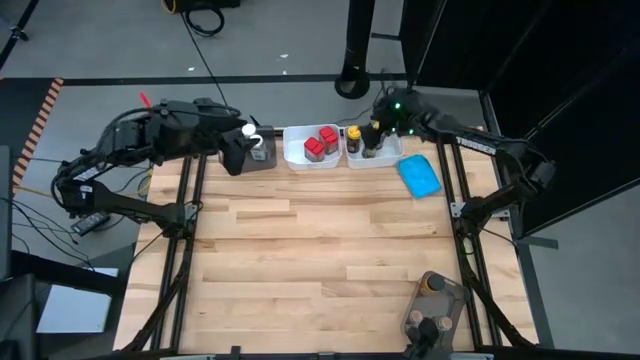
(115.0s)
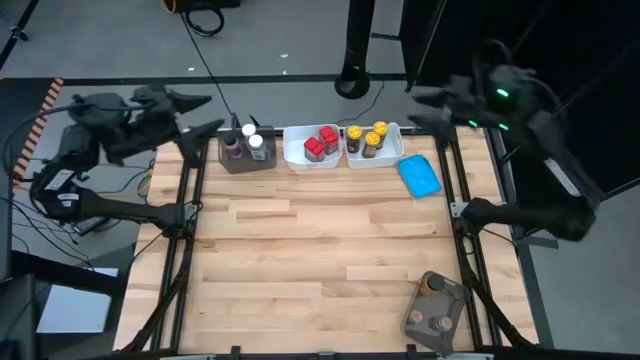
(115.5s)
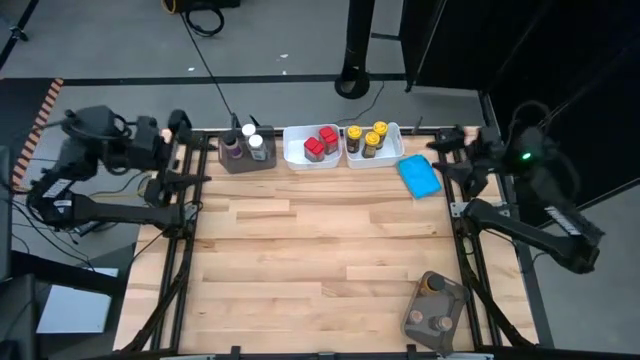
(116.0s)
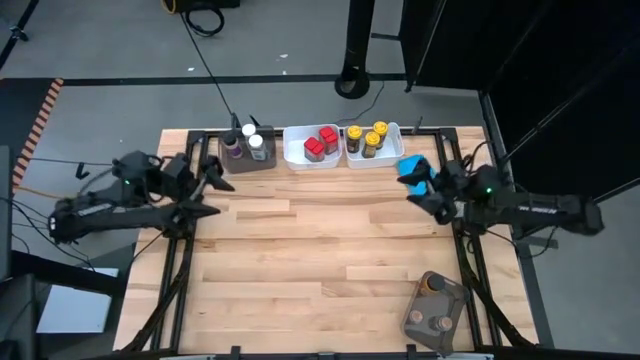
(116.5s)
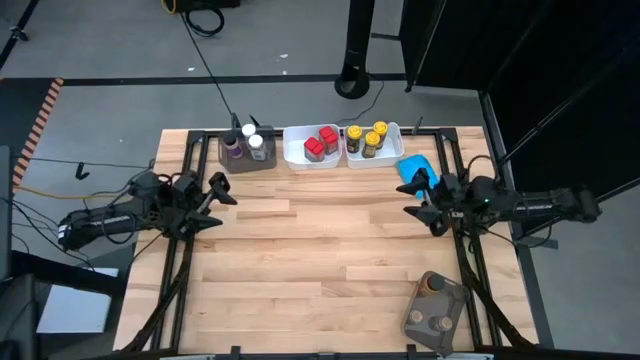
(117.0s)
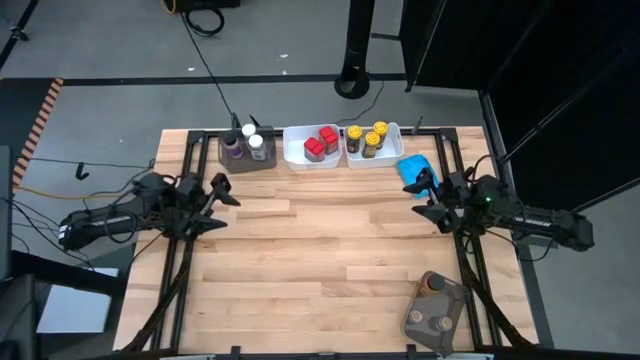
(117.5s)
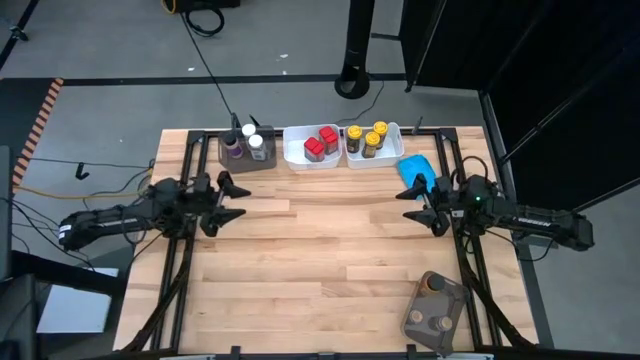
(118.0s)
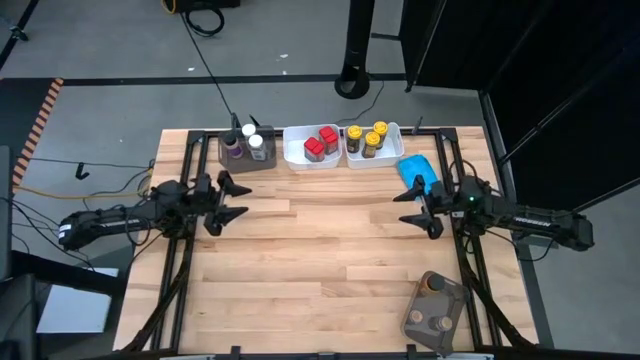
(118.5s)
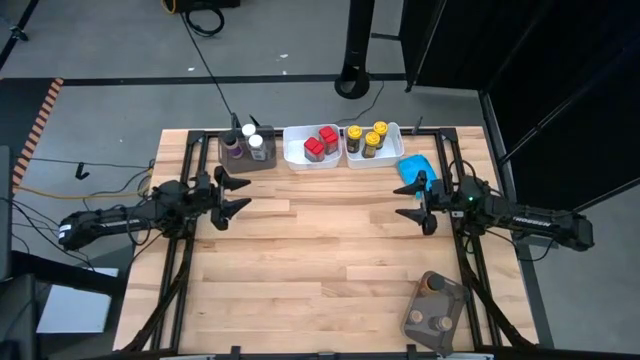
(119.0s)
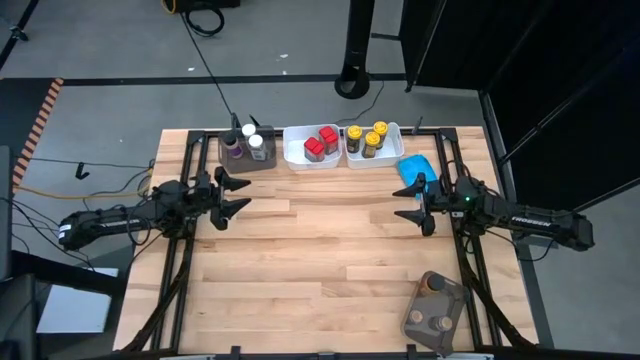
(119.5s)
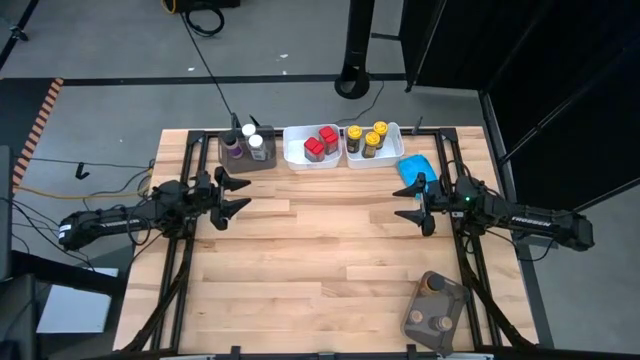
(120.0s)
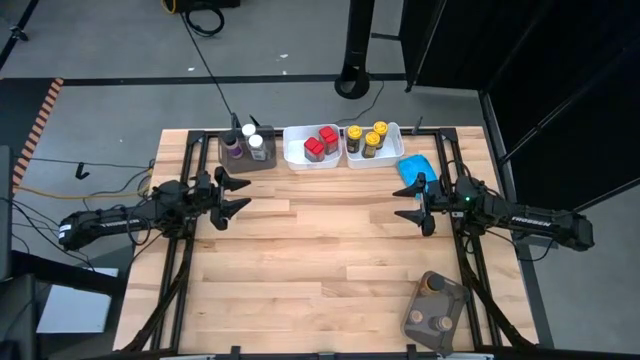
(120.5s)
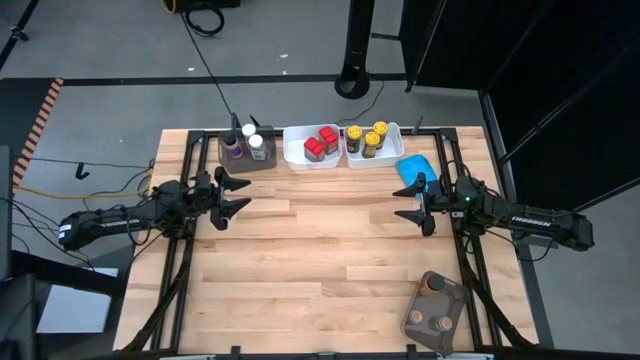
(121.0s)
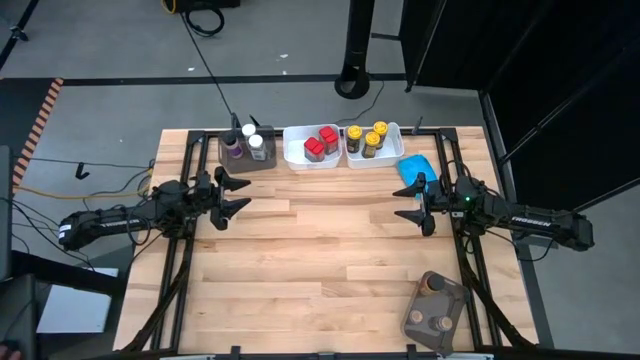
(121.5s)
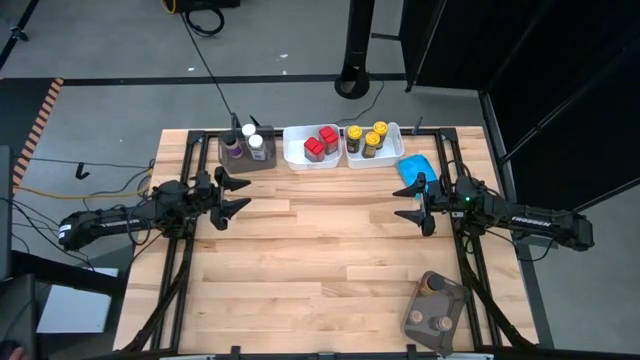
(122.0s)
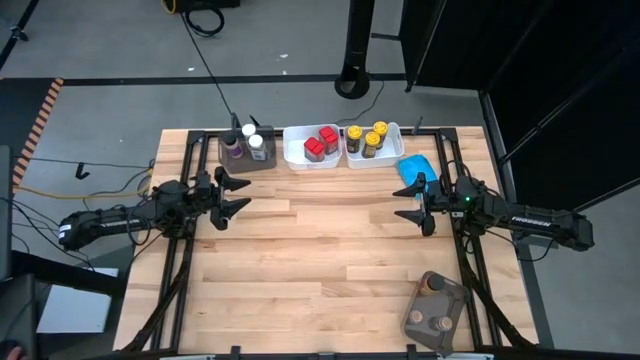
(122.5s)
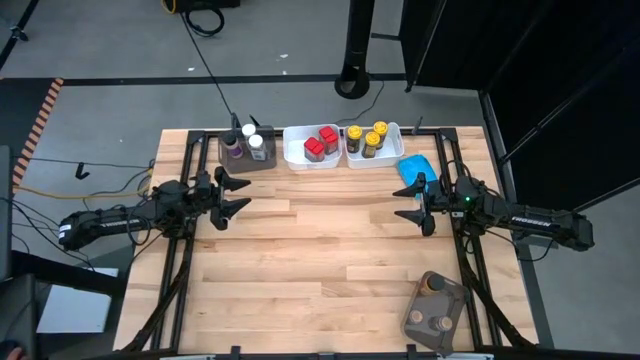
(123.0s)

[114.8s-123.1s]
Task: Sort spices by type
Return to Home Position

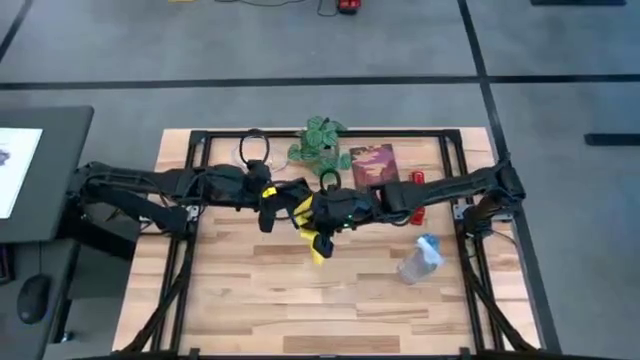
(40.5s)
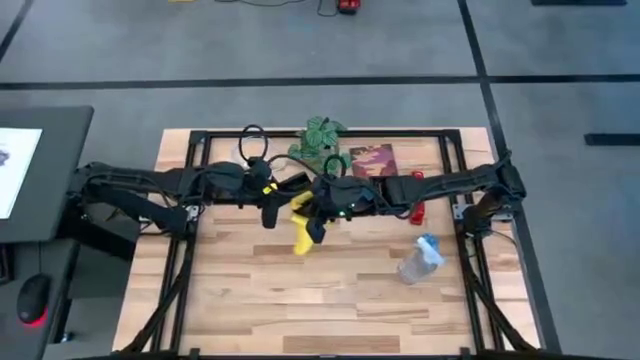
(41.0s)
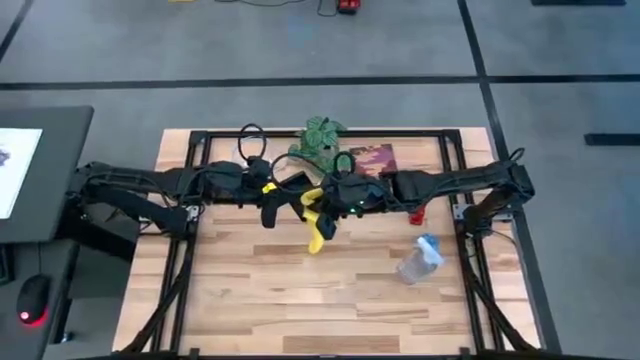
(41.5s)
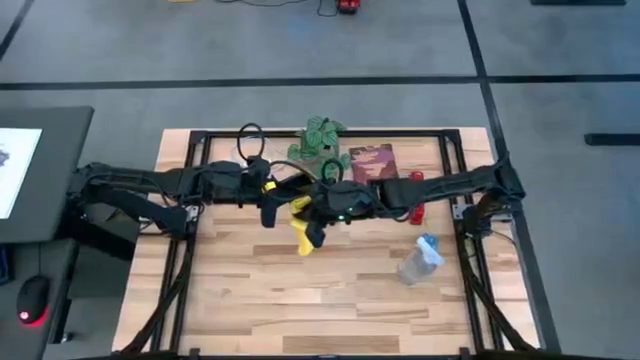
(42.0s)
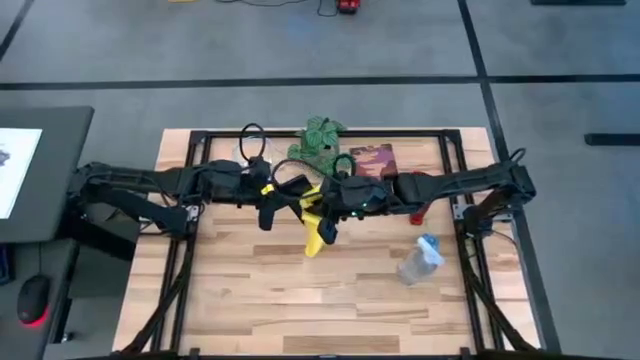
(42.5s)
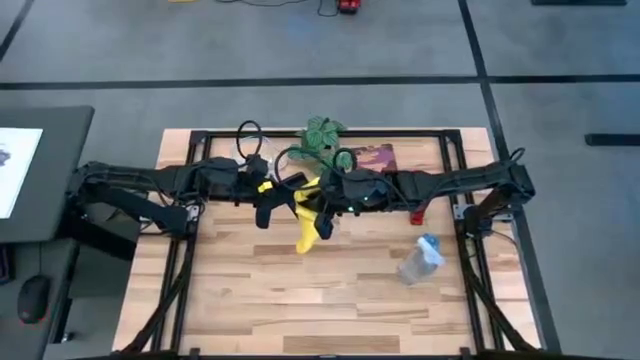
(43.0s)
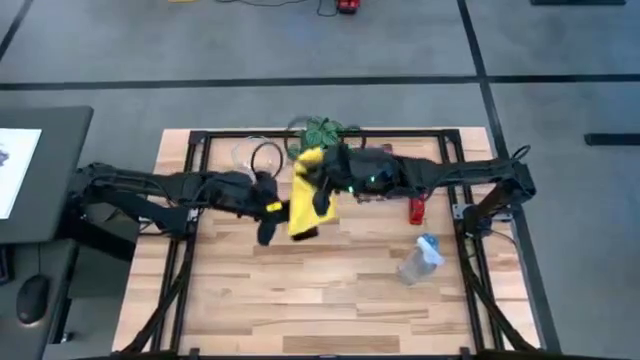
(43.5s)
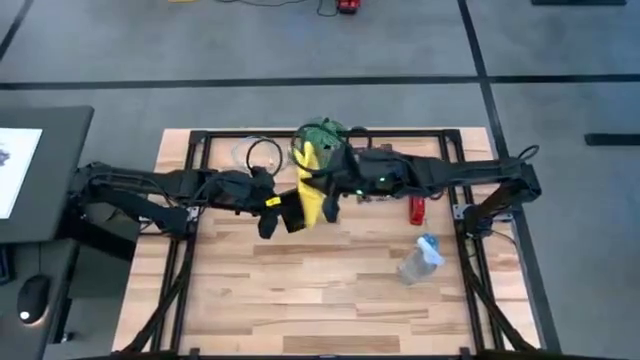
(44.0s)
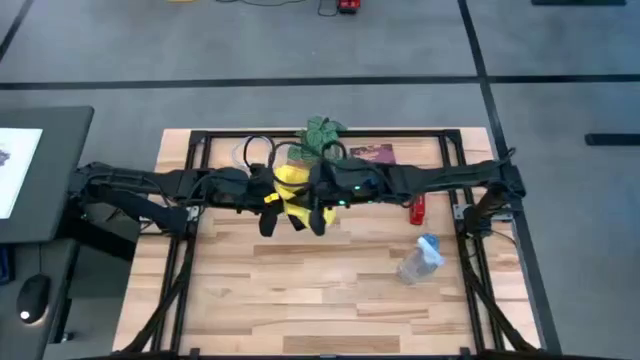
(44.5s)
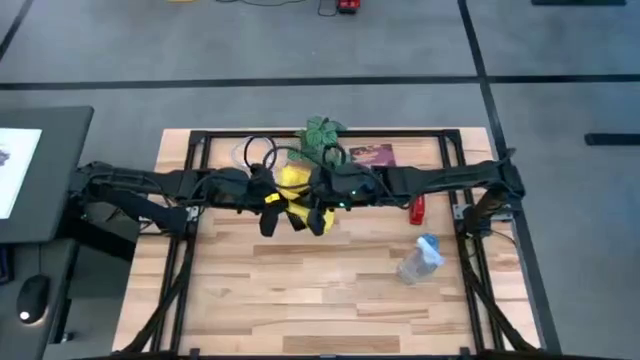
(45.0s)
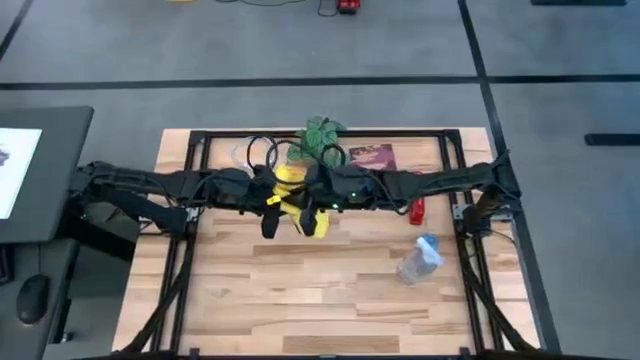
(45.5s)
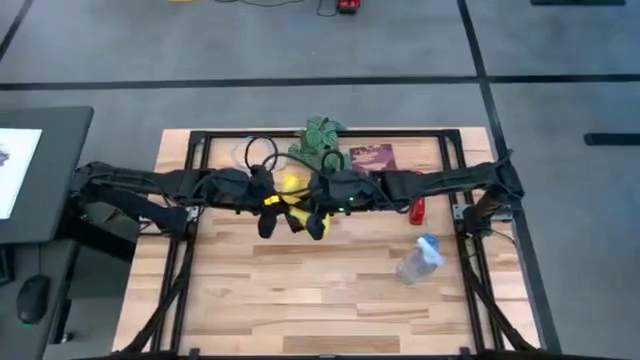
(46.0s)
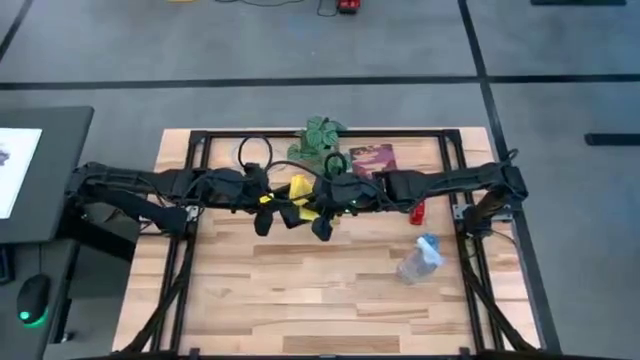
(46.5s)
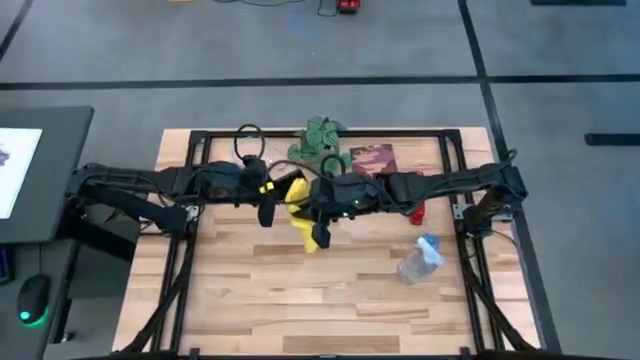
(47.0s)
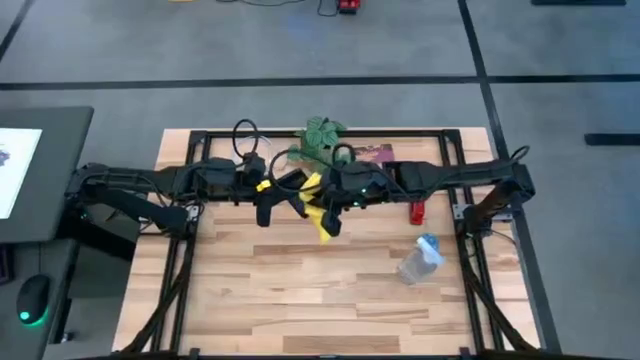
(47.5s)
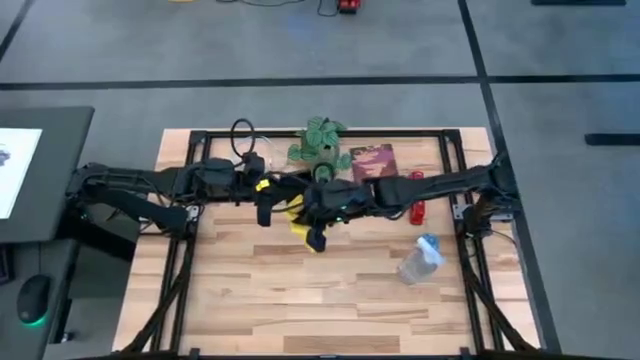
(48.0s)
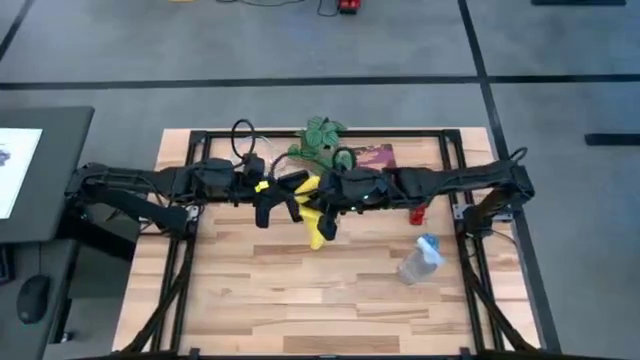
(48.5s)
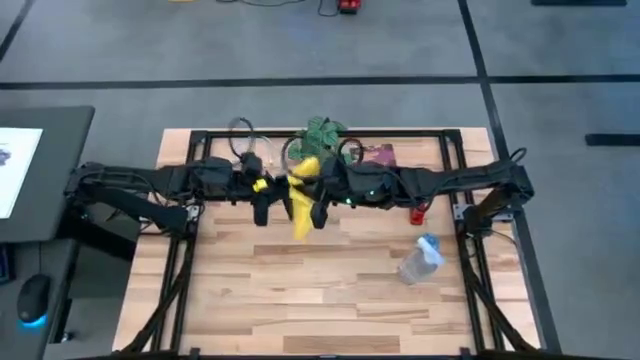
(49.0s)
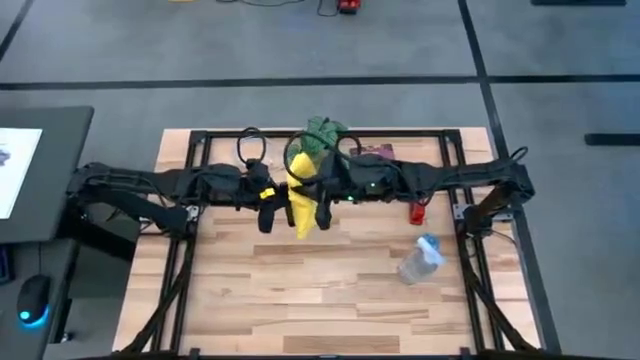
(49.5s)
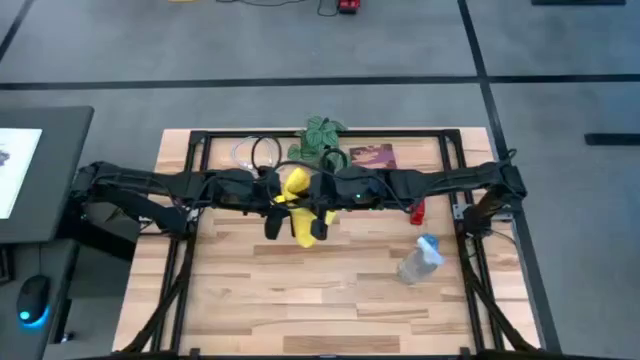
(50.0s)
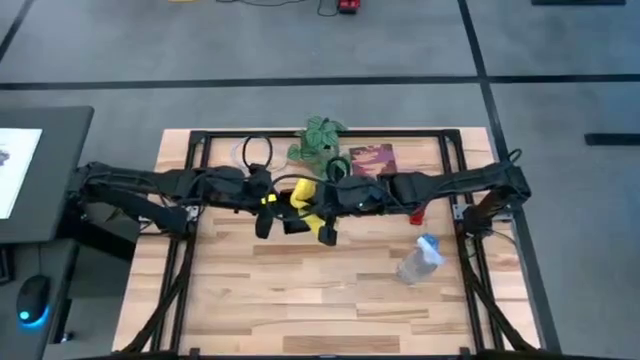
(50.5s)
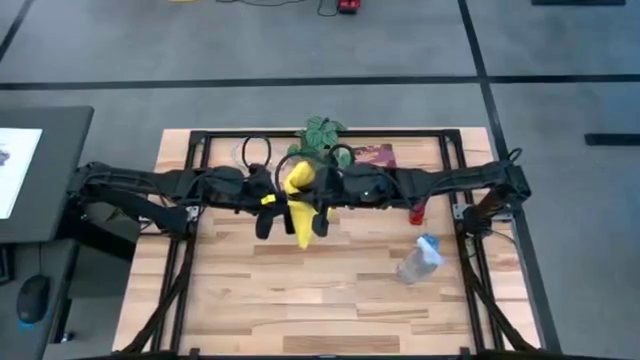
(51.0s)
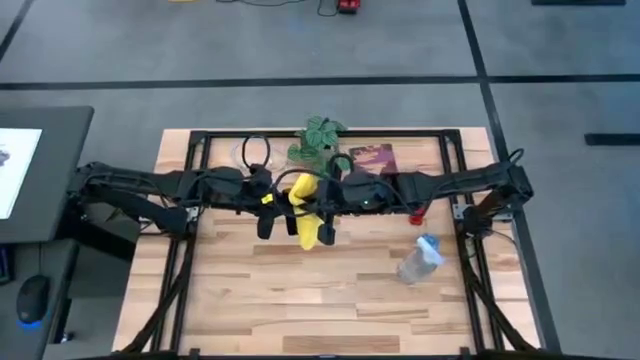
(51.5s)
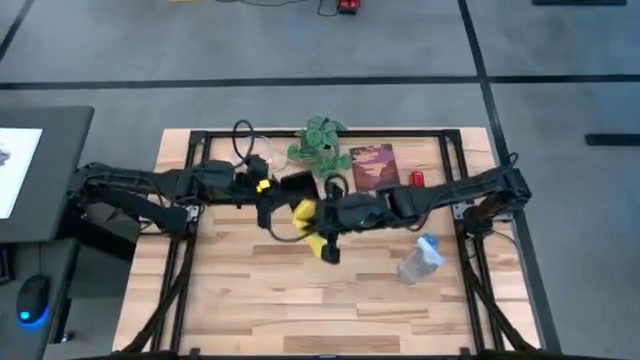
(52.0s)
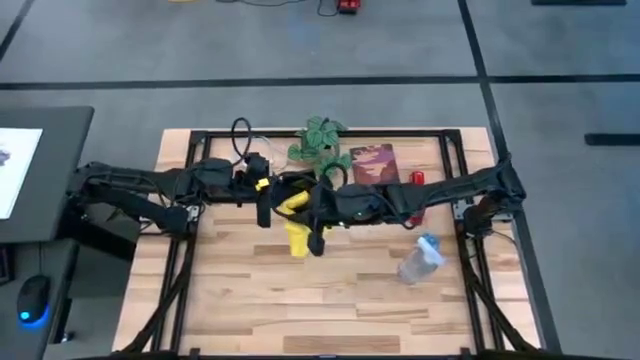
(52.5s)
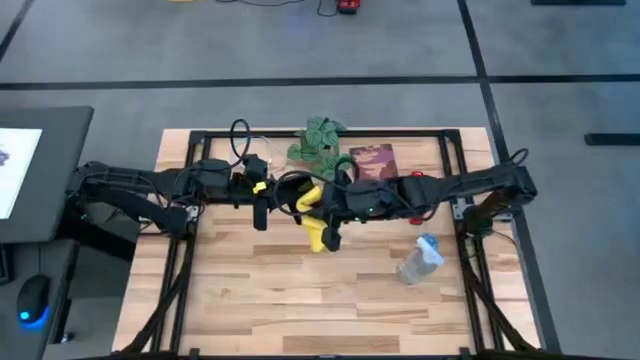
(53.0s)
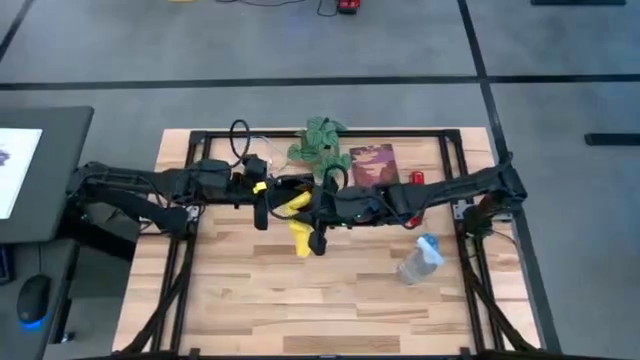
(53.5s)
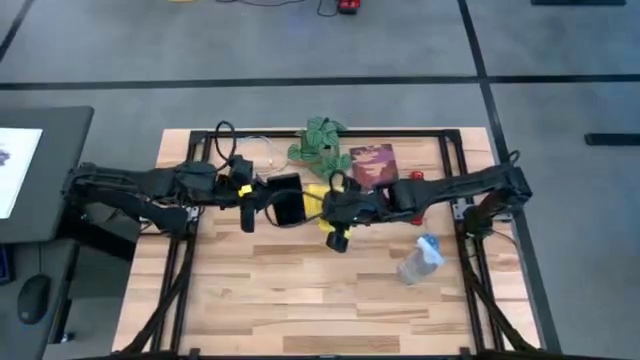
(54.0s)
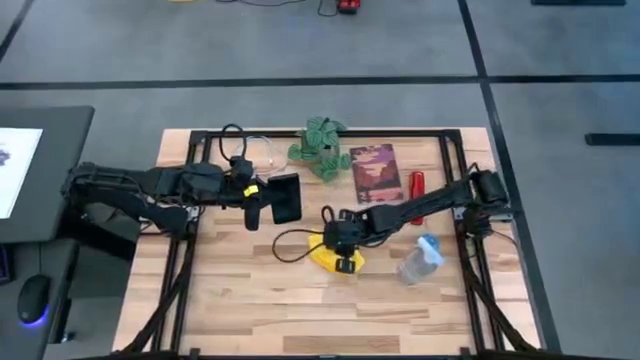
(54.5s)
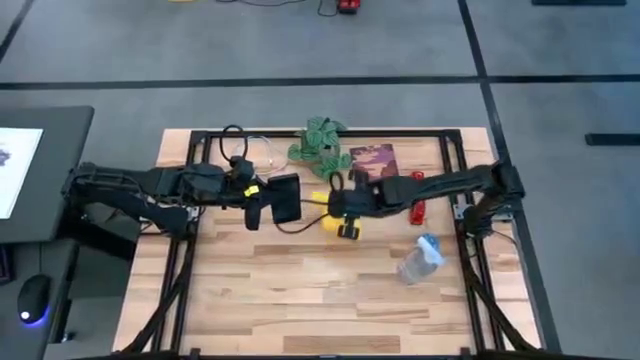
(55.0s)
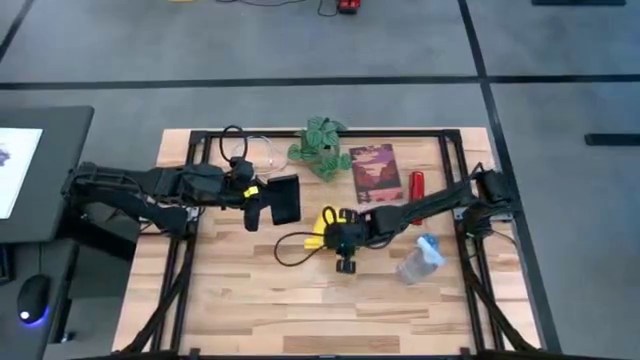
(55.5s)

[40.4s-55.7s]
Task: Apply microfiber cloth
Wipe the front of the cellphone with the yellow microfiber cloth
